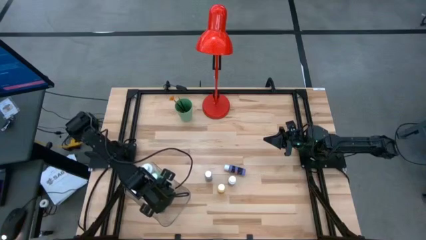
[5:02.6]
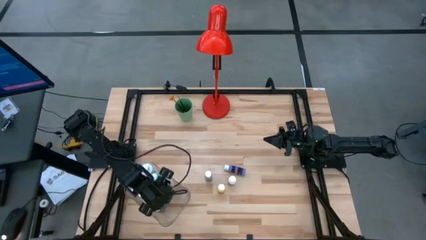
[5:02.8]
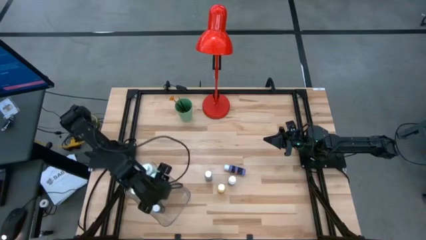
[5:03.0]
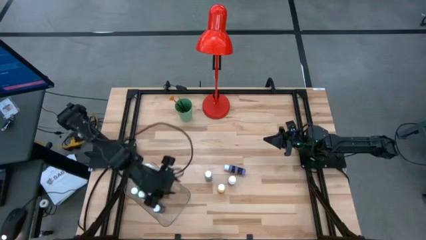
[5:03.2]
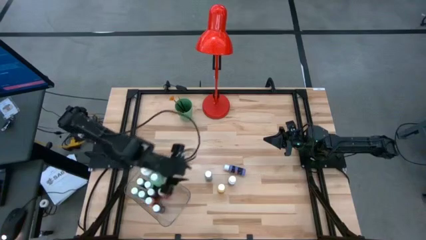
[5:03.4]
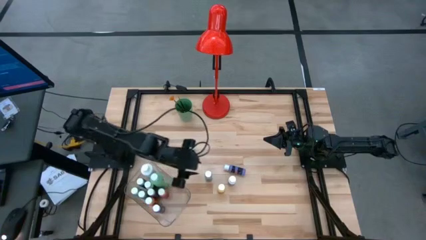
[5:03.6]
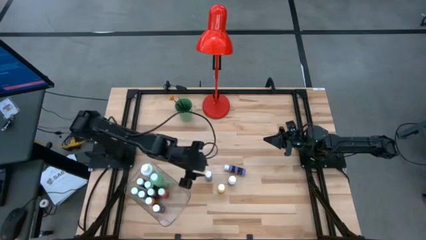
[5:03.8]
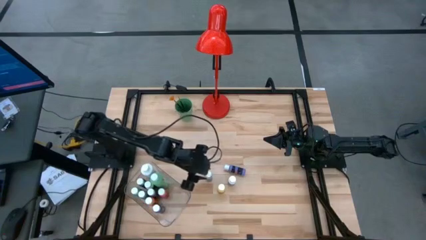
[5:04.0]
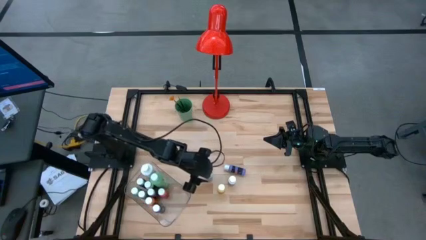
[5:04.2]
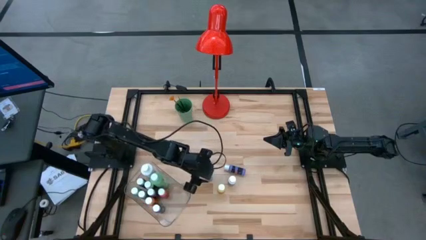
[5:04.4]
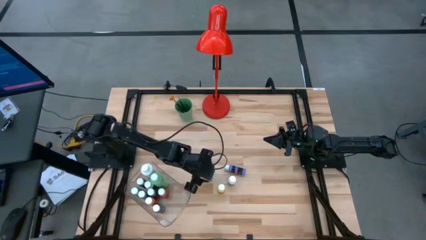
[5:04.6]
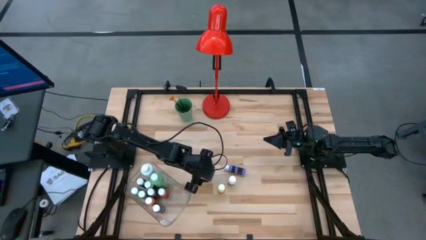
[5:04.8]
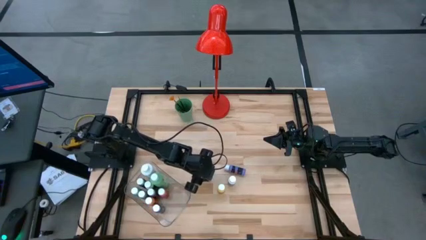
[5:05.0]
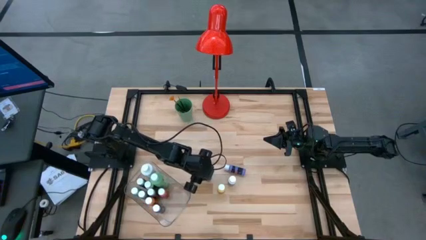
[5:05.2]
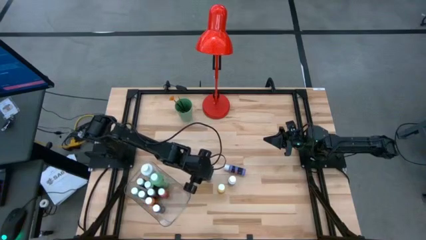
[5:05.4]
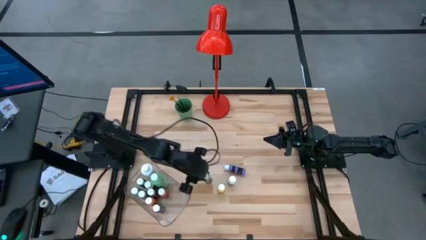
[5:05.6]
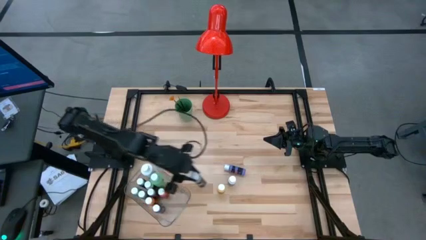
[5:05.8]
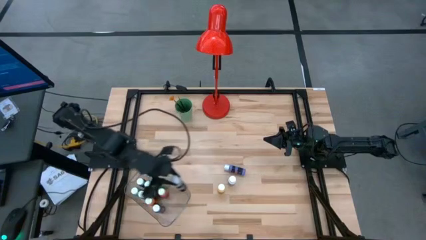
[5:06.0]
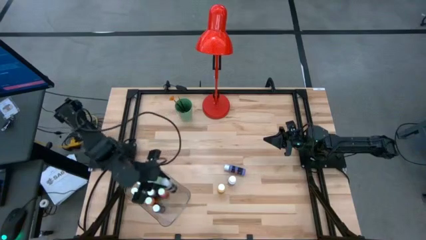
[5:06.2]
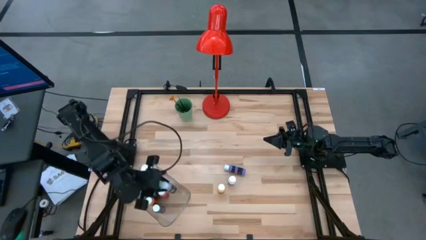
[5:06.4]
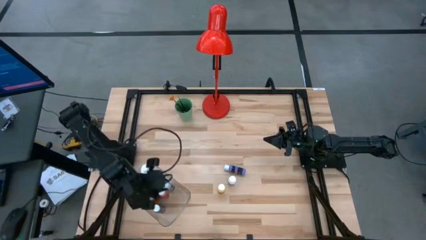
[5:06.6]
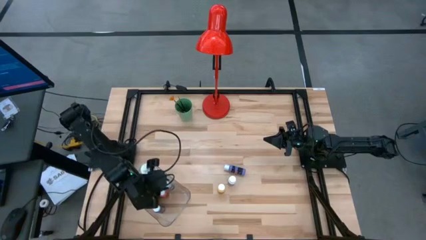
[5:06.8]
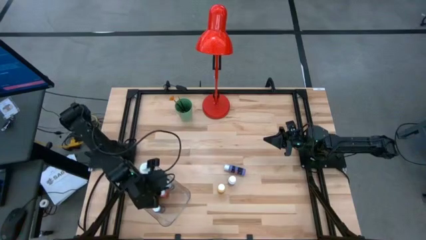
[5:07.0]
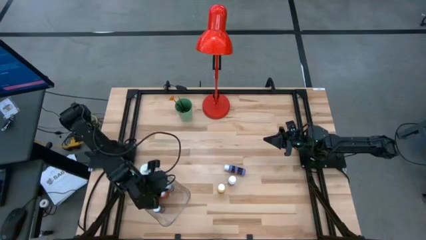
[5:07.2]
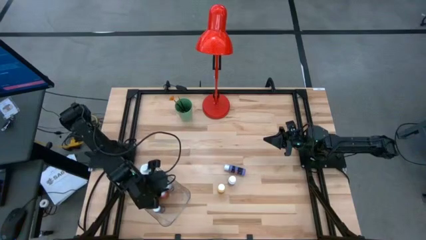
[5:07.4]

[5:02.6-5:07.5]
Task: Pick & Place Paint Supplies
Put the gray coloring bottle into the transparent bin

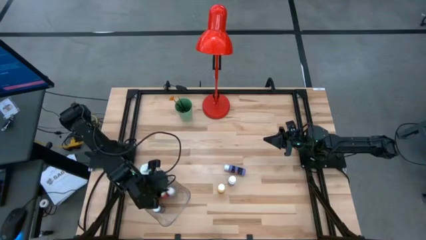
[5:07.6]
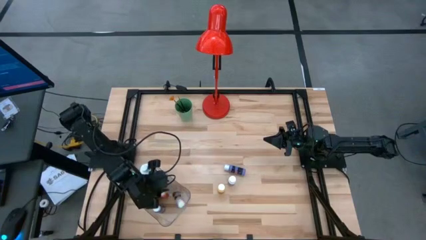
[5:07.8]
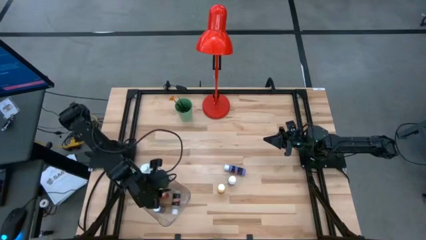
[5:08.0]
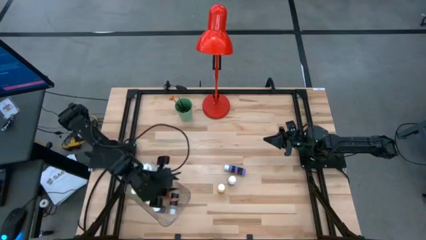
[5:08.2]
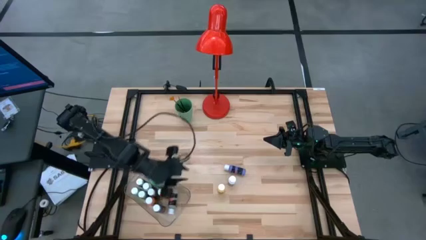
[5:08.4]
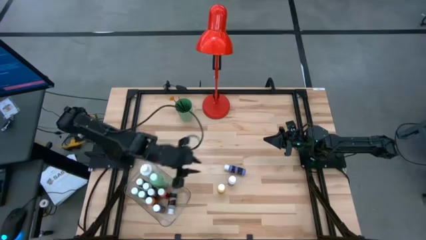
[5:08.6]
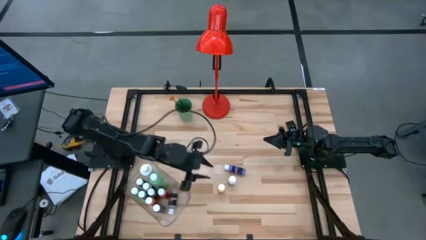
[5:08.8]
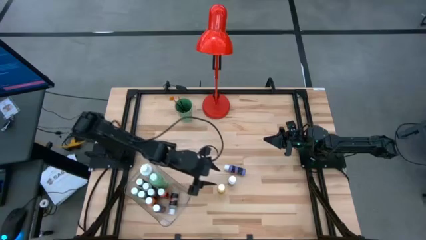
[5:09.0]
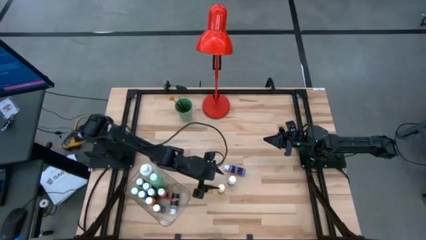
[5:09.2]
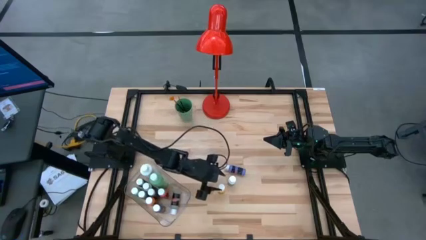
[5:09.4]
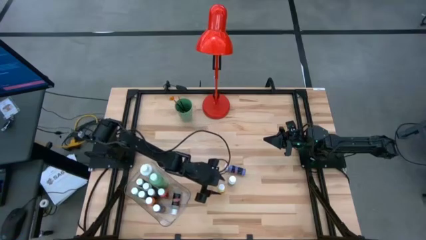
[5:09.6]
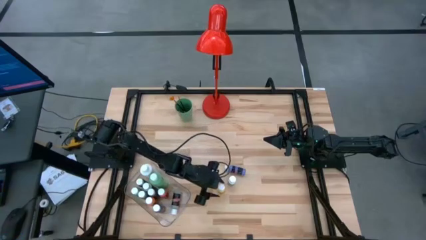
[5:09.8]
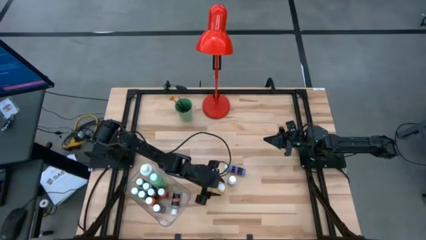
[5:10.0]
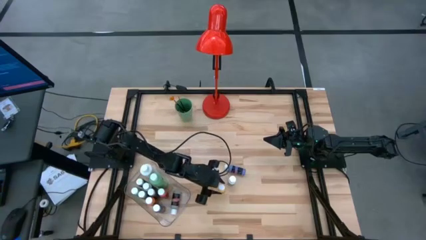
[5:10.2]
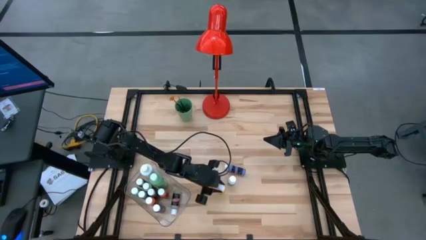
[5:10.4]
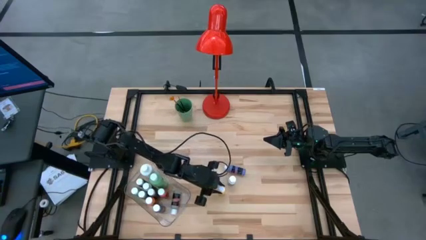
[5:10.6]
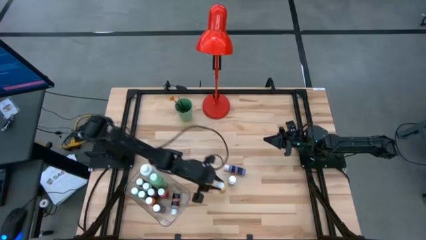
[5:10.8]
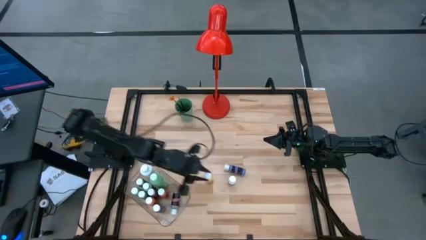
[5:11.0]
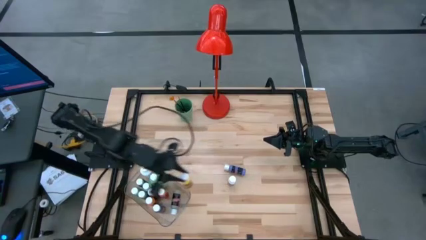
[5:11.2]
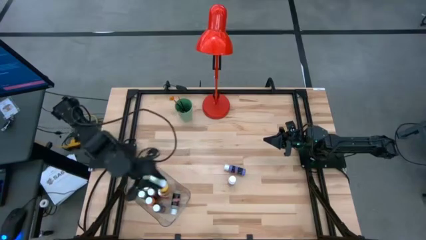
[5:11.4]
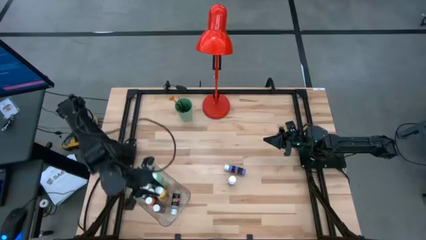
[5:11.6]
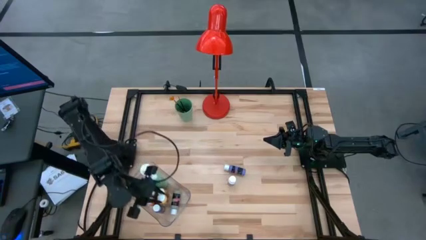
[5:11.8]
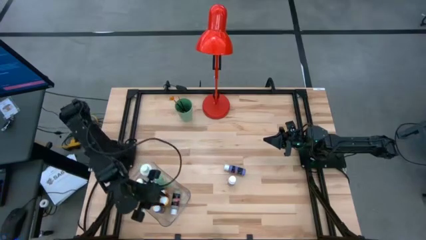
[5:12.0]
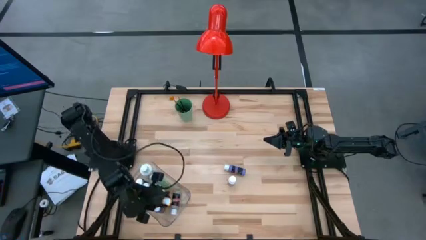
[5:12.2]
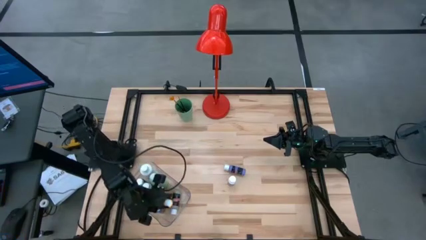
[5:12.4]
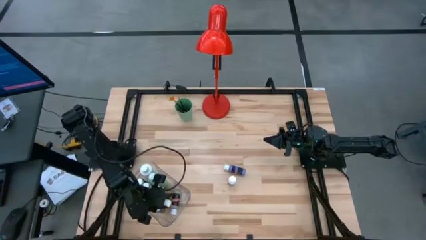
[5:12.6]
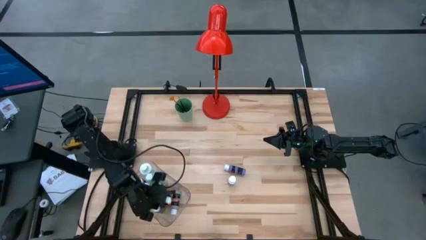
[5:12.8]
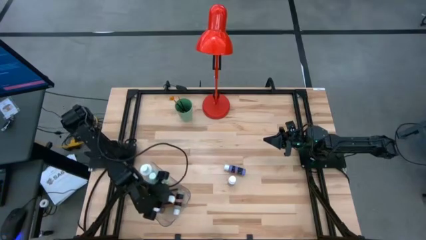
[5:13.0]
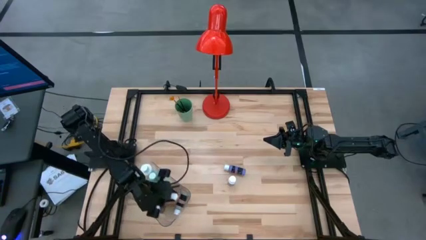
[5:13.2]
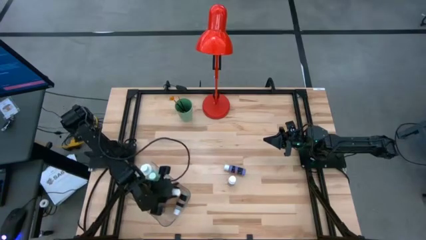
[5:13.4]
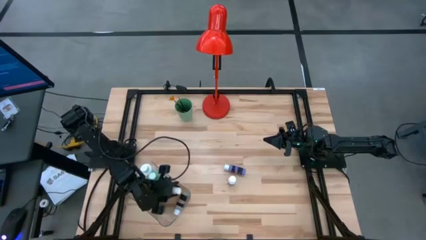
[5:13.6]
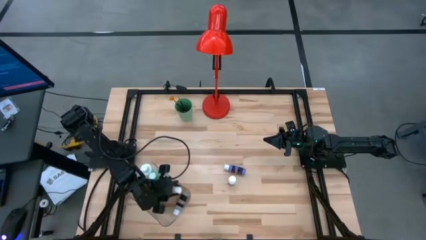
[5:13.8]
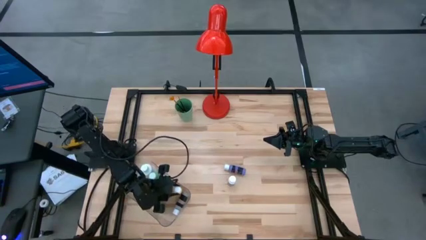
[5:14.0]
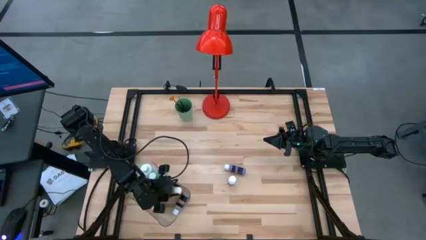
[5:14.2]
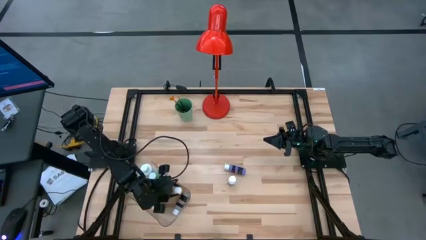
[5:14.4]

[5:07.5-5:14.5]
Put the yellow coloring bottle into the transparent bin

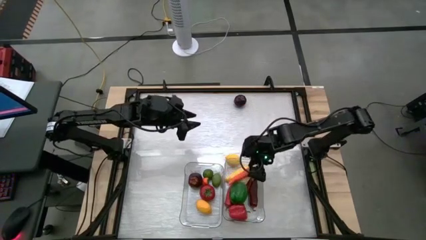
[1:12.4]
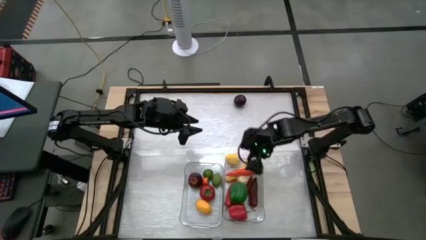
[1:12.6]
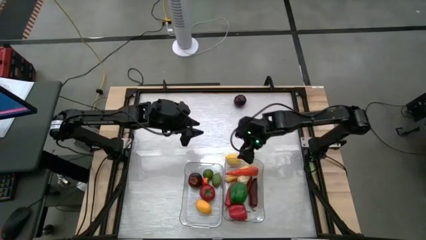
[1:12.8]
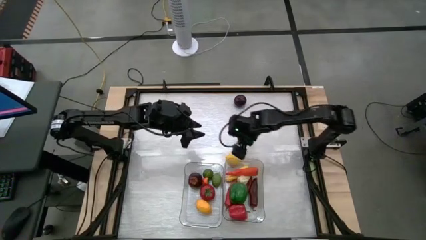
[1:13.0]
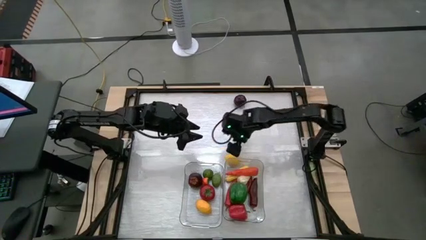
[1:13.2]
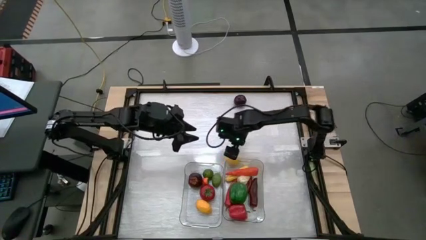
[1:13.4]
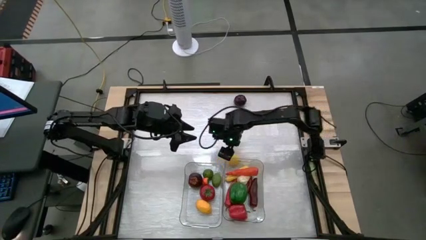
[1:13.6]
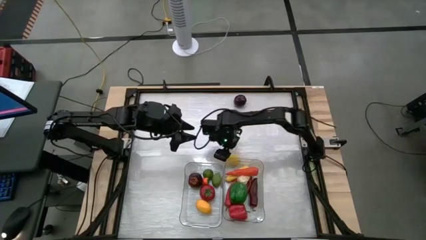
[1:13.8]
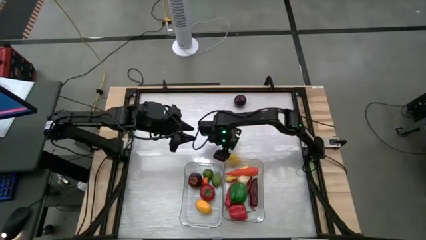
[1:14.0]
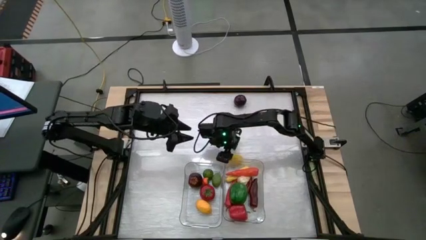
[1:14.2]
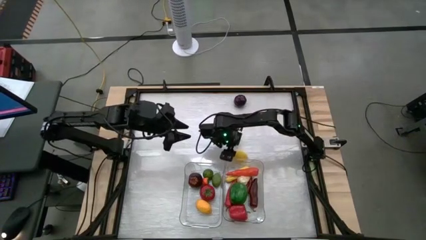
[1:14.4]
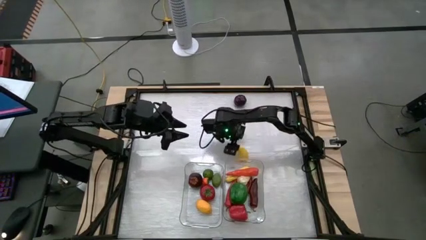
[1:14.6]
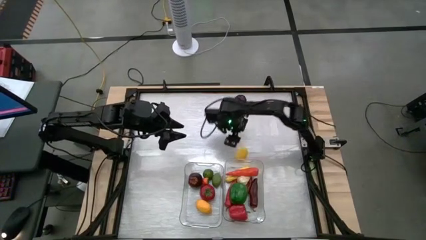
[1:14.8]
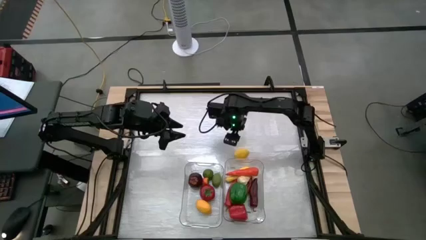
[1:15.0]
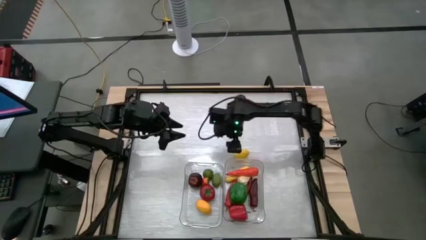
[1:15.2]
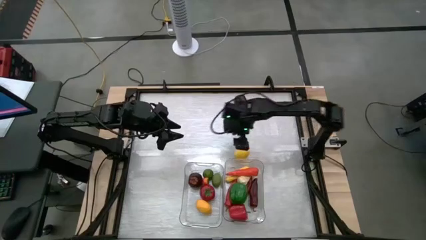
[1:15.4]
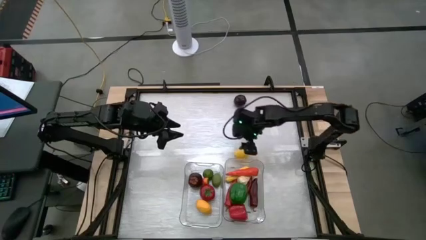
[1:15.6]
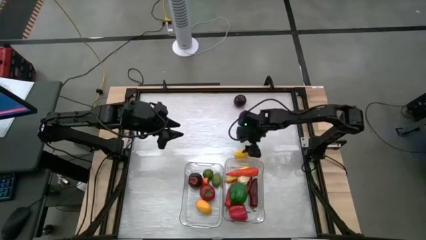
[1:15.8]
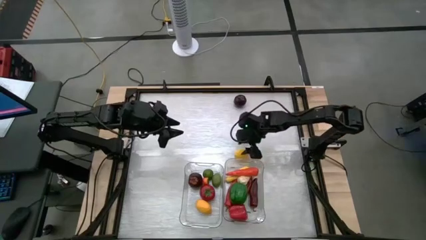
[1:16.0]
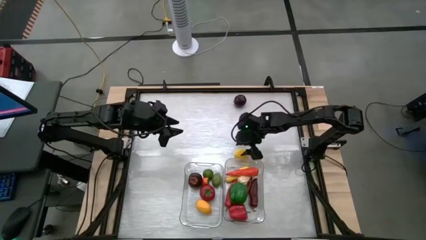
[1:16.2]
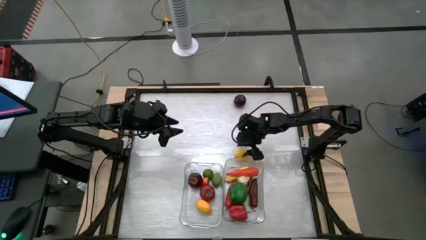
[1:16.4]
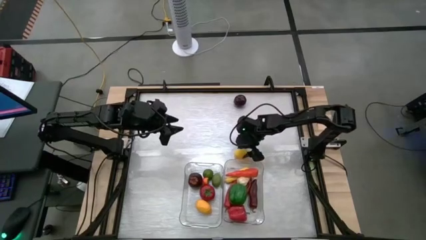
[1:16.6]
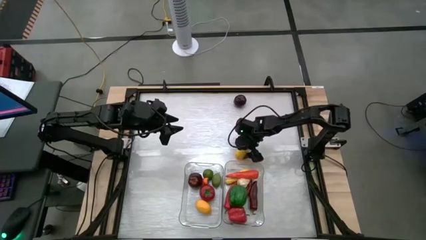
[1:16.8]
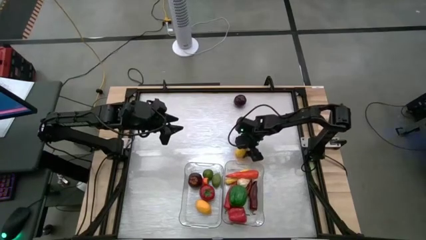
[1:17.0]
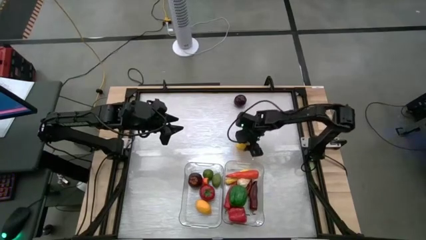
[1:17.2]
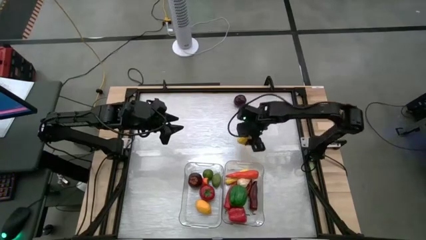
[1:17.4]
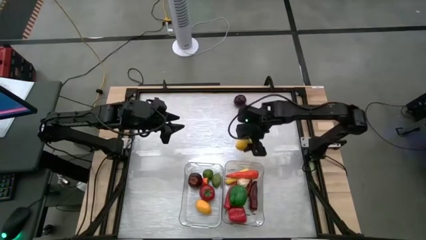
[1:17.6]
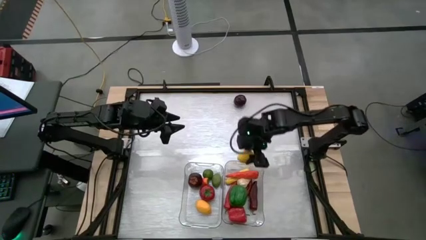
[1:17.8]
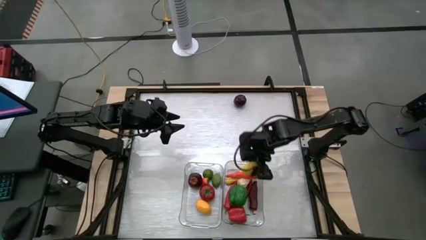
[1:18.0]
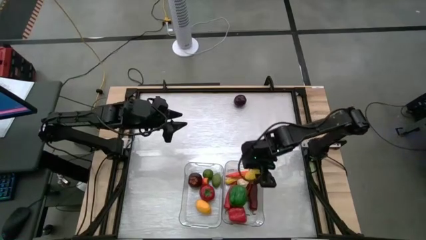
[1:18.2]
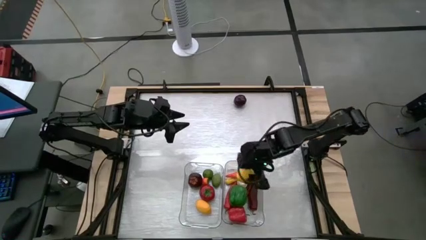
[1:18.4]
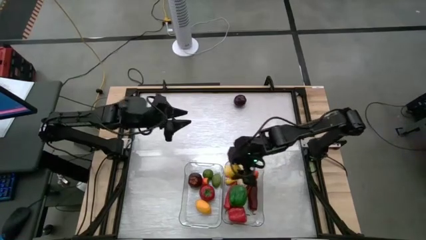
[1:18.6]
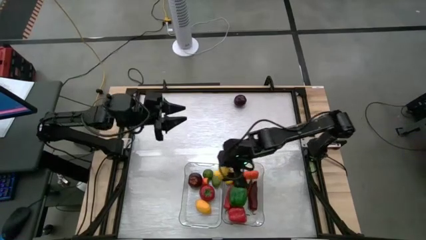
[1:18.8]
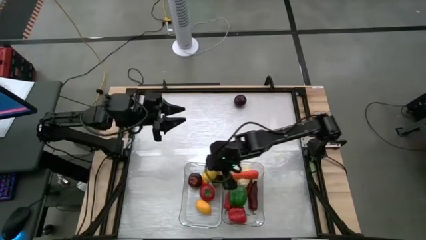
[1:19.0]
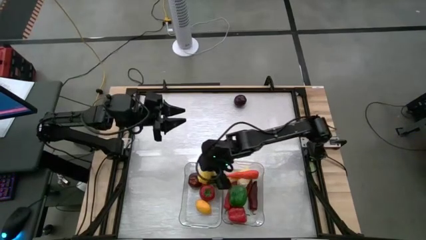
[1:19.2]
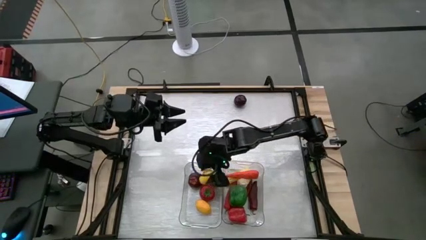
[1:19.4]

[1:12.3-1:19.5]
Task: Sort produce into baskets
Put the lemon into the left transparent bin
